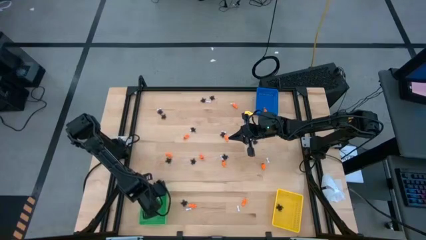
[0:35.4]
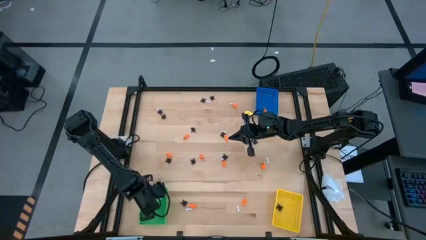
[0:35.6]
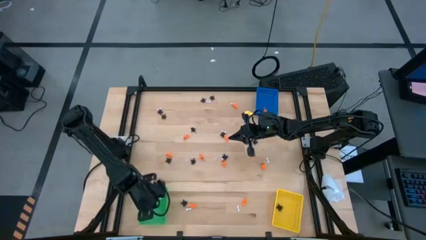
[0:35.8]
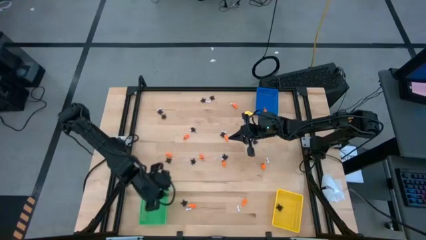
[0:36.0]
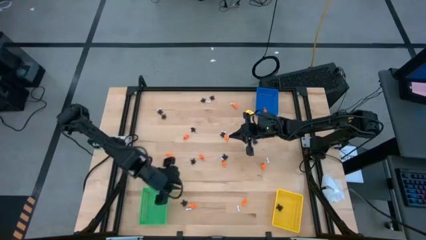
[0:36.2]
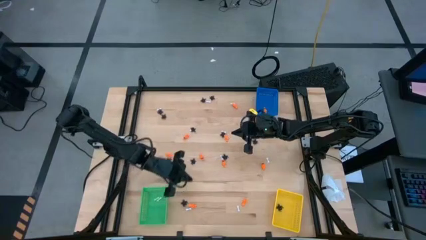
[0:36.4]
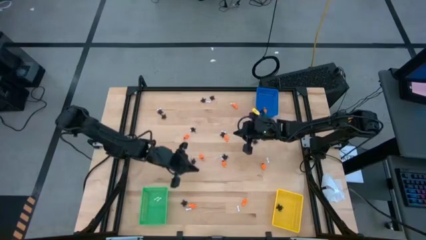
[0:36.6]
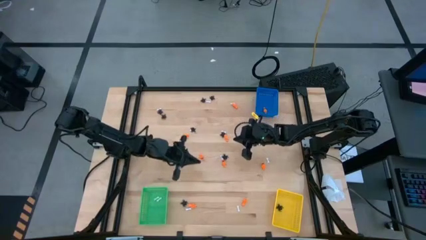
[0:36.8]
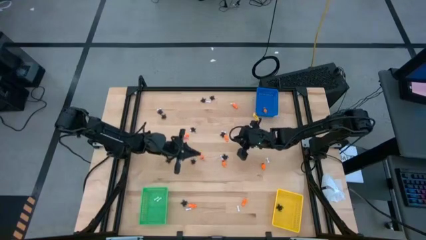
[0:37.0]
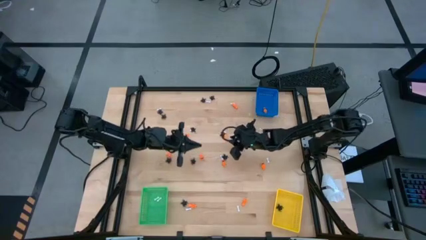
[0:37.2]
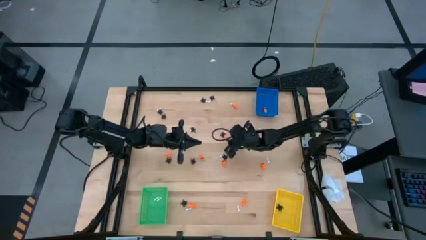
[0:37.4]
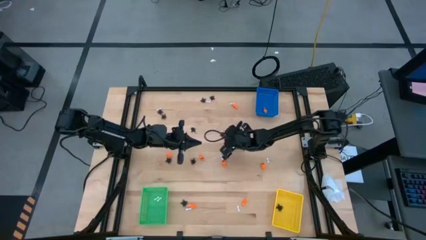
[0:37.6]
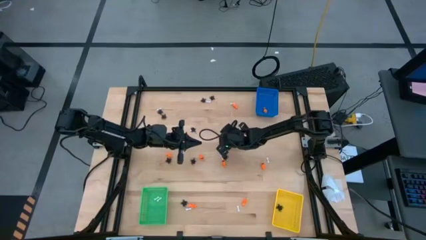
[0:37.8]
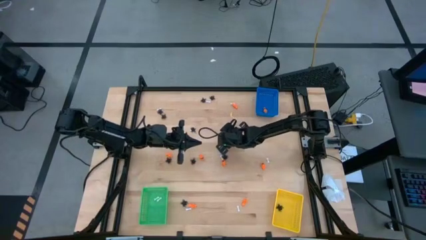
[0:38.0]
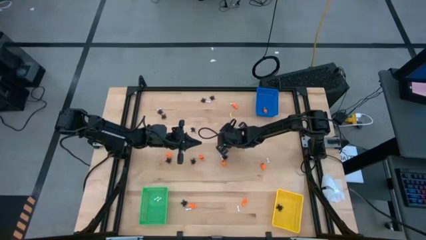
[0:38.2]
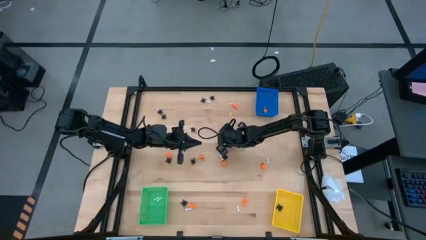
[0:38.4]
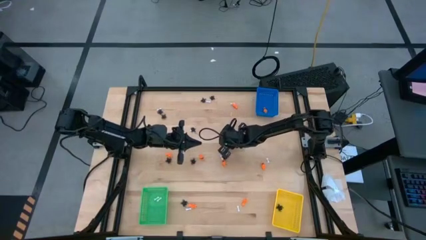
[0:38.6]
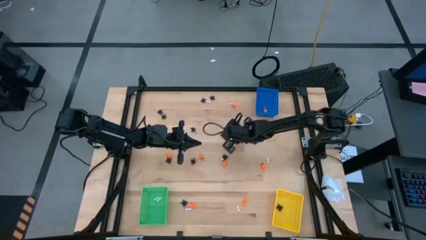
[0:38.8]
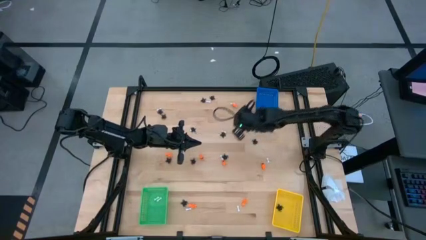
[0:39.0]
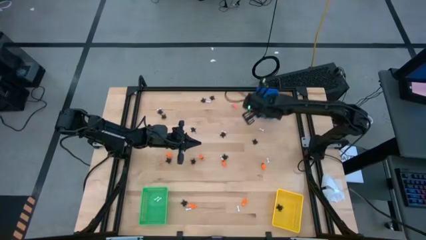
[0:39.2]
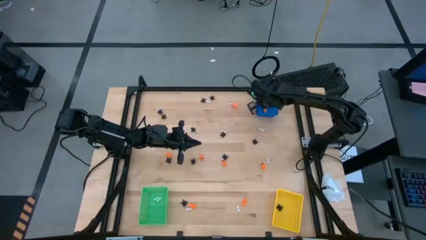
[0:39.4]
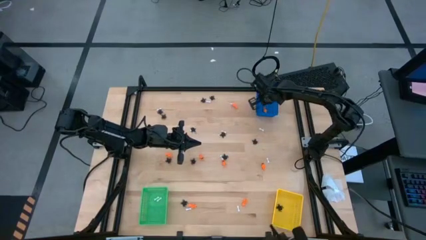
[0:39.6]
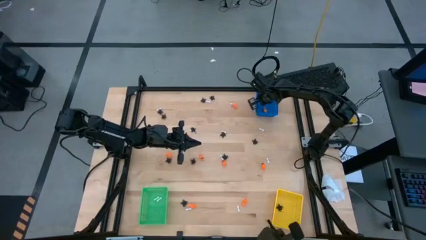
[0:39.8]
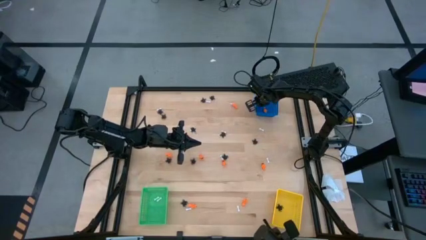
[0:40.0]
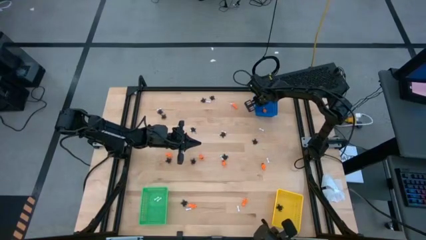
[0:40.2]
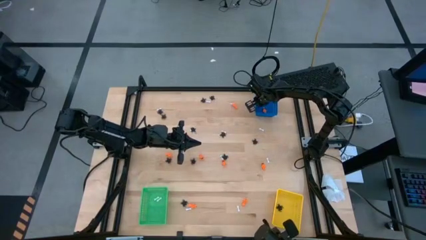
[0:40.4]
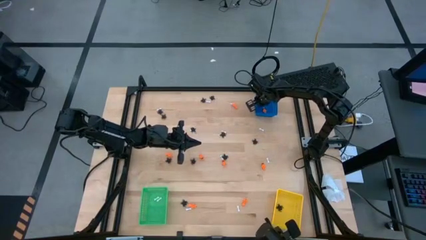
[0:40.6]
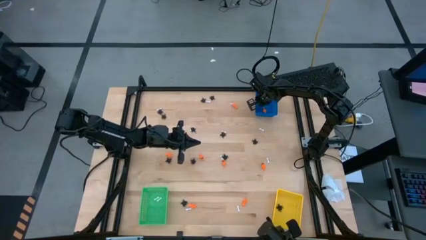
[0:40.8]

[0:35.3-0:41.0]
Task: Sort Halloween decoration
Put the orange toy skeleton into the blue bin

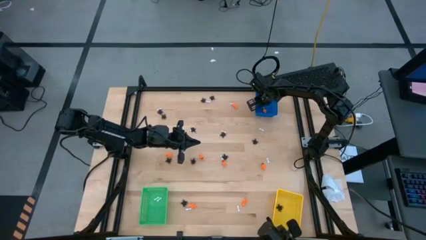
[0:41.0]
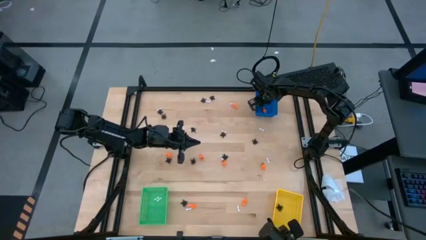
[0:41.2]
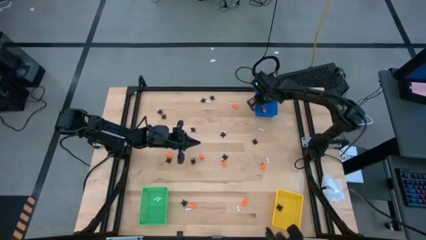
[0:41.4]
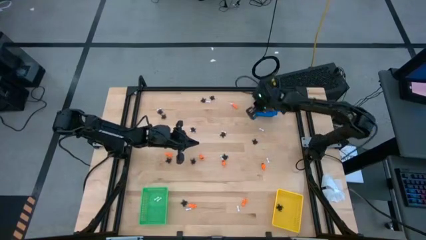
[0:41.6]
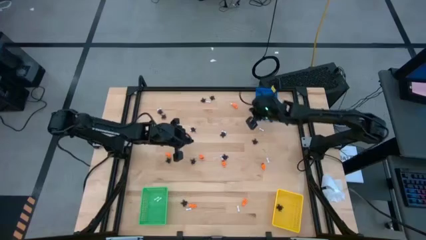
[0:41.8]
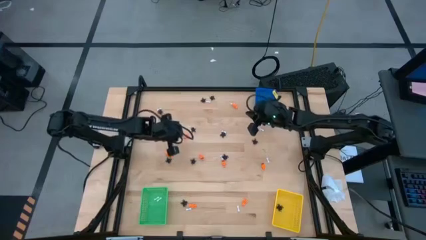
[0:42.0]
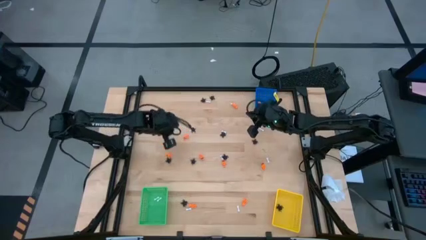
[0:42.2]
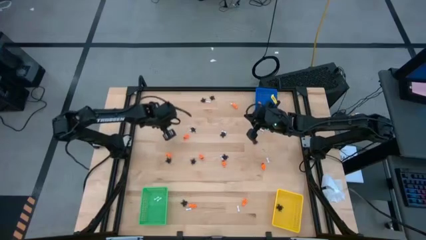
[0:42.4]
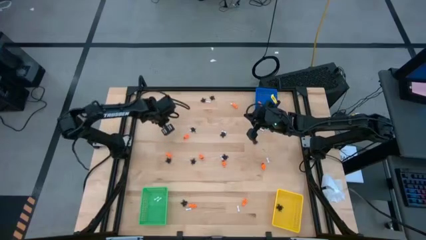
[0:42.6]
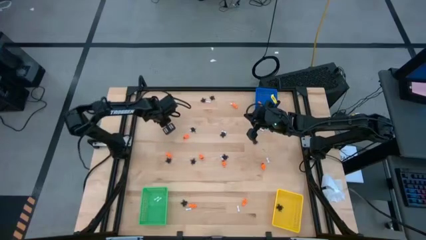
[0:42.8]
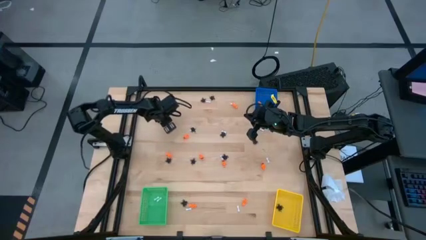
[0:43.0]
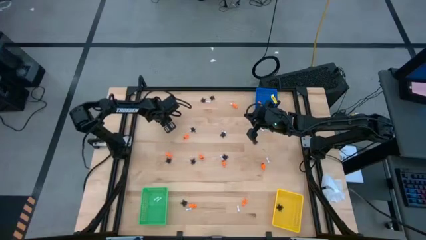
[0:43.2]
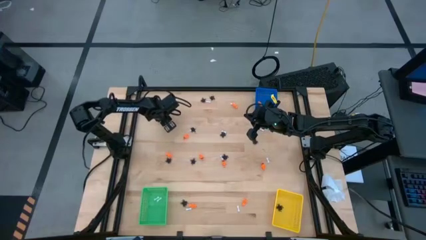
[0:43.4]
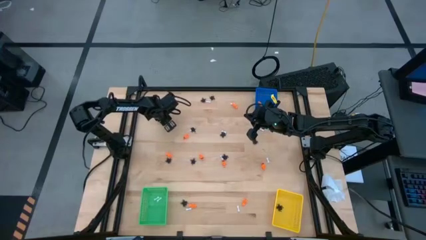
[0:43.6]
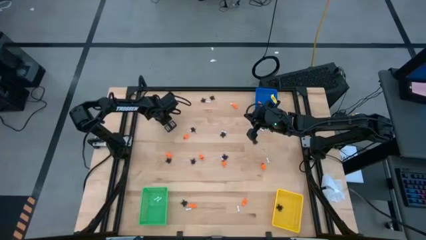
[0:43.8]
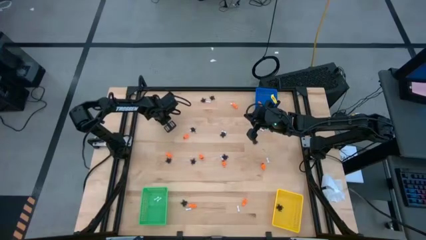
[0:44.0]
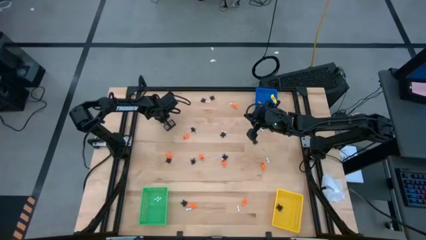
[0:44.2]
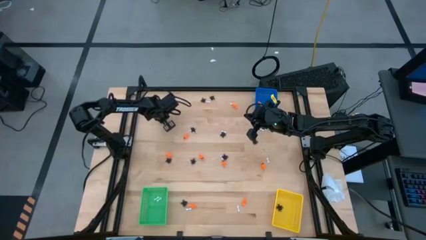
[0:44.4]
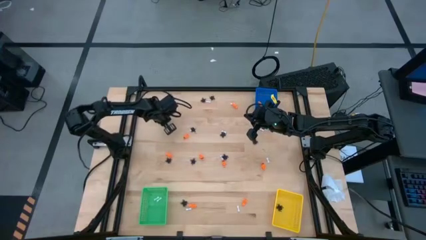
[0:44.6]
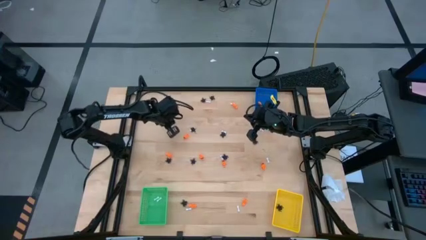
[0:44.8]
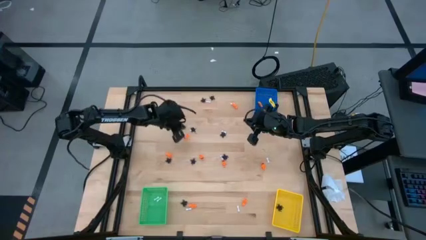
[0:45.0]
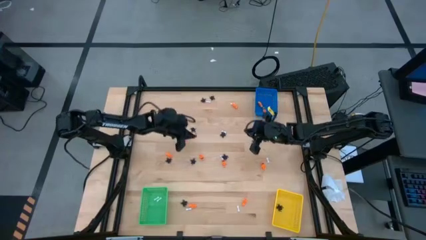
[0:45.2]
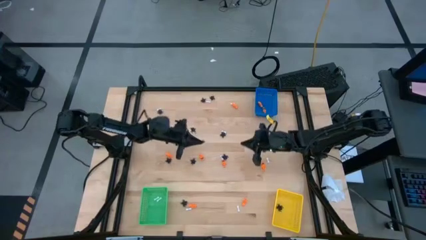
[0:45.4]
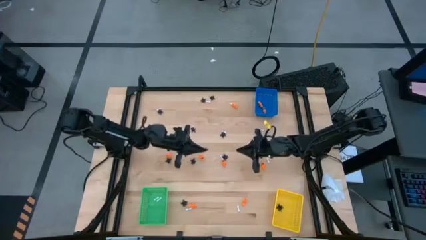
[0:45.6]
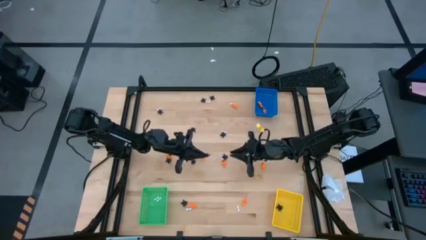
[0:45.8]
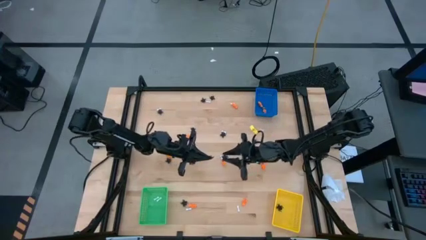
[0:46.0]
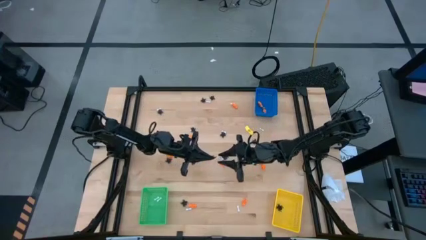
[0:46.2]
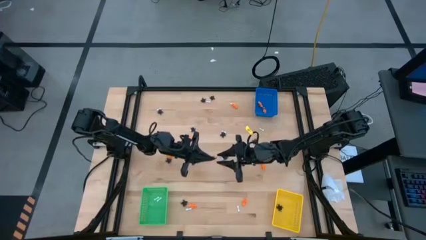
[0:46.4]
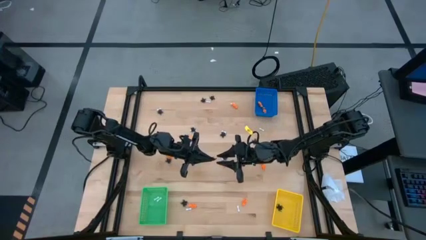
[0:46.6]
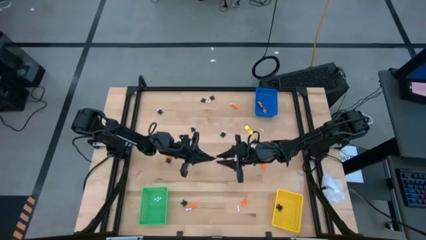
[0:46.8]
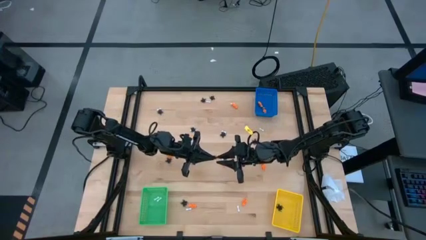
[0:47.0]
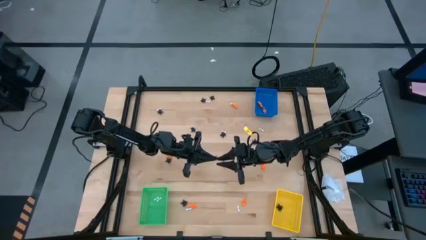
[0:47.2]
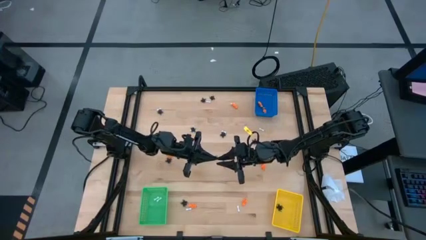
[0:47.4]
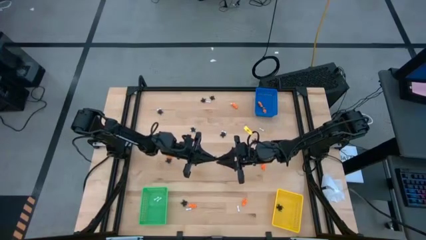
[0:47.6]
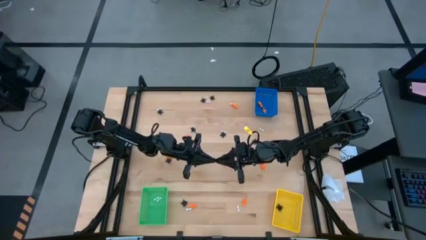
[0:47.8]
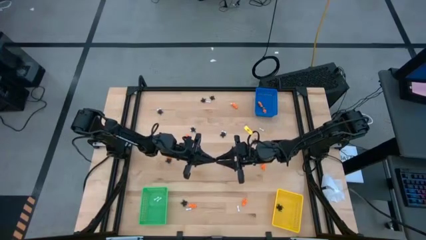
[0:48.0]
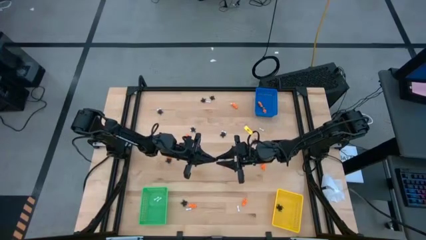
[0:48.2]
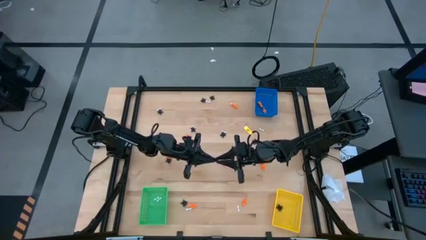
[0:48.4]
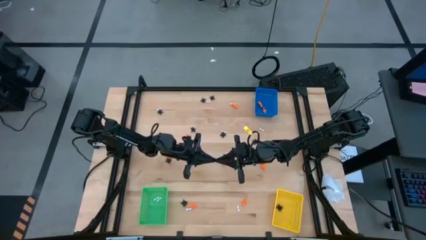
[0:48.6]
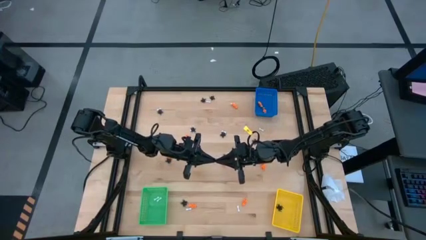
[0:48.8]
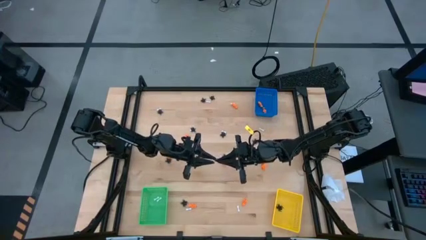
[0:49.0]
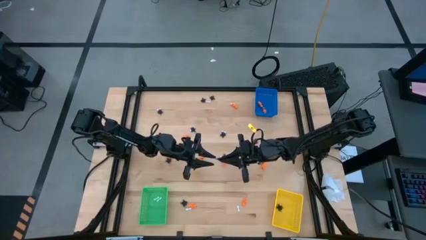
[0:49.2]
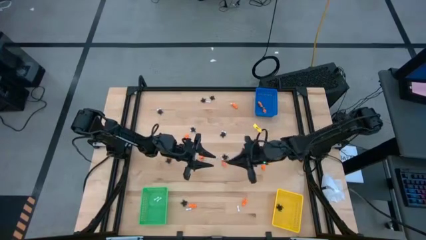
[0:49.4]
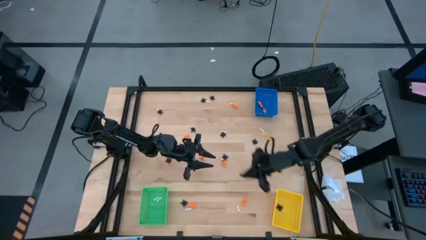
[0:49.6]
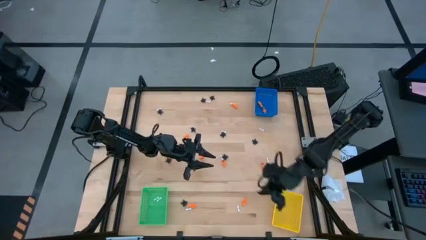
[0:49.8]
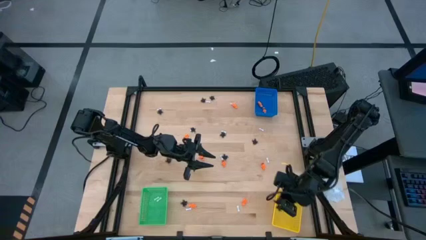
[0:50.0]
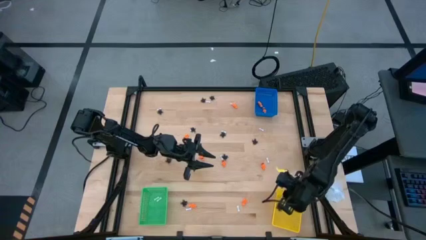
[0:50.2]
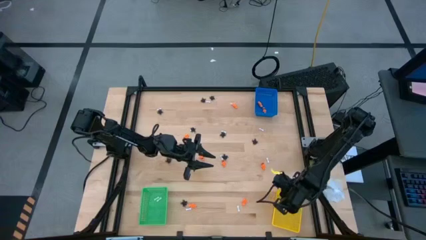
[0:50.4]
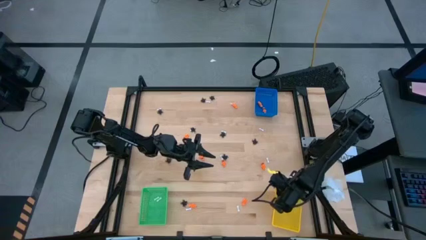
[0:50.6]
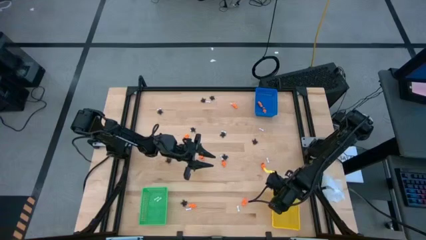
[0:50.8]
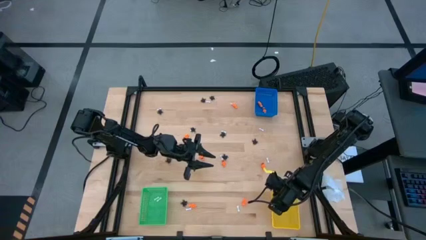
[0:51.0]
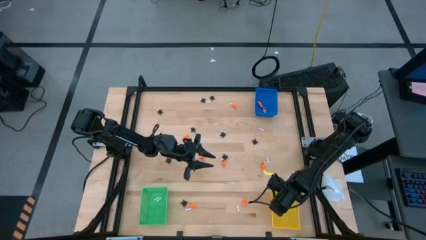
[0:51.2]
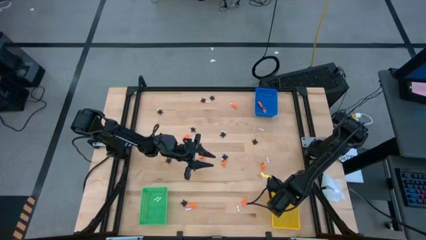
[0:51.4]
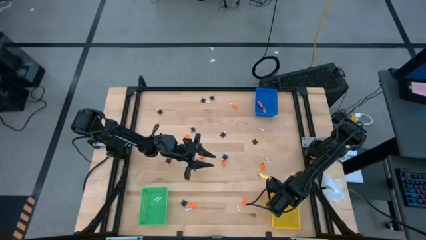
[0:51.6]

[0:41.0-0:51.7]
Put the black spider toy into the yellow bin
